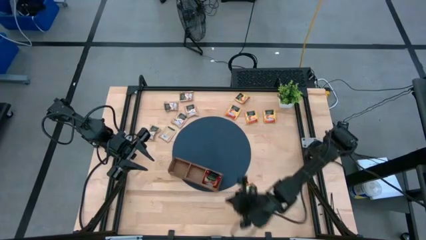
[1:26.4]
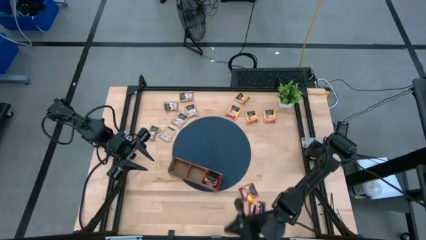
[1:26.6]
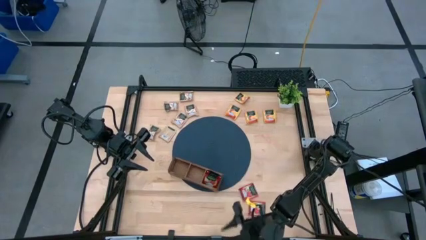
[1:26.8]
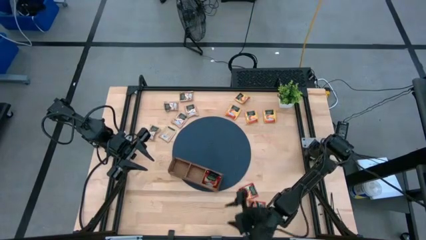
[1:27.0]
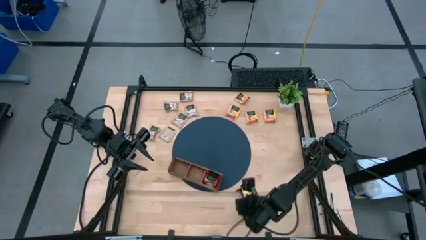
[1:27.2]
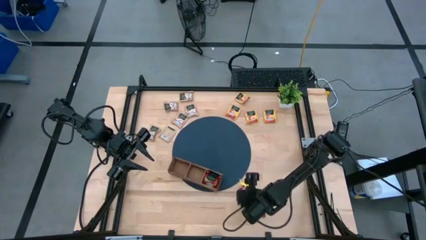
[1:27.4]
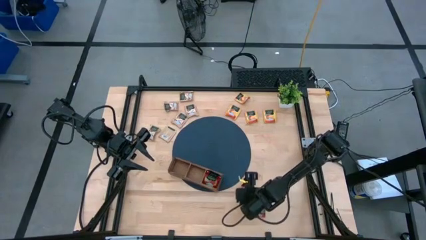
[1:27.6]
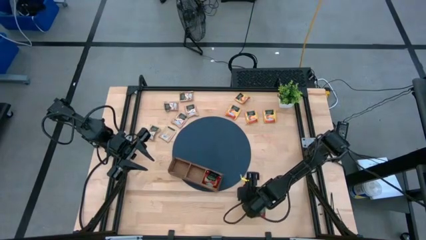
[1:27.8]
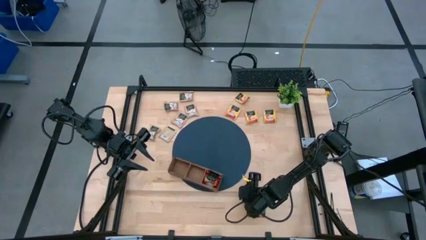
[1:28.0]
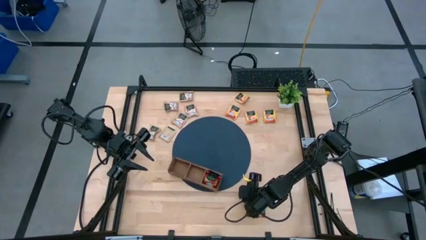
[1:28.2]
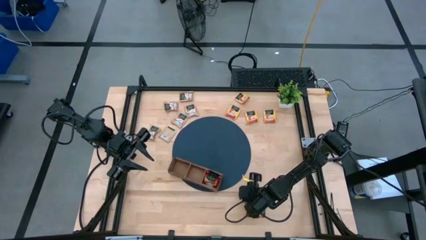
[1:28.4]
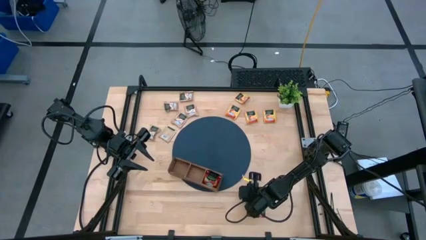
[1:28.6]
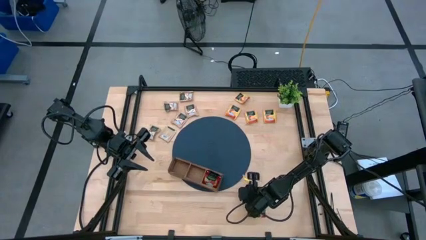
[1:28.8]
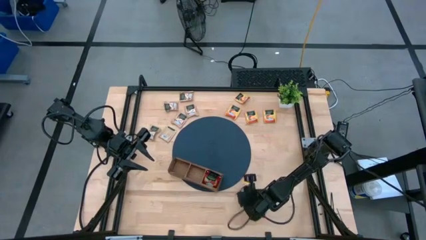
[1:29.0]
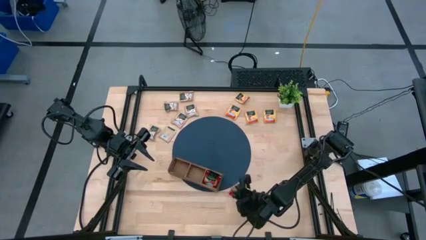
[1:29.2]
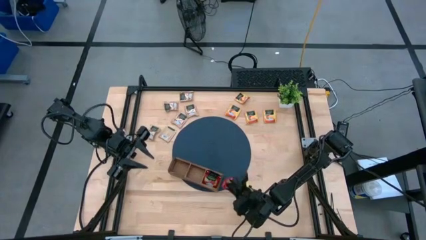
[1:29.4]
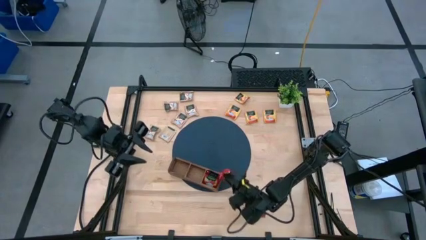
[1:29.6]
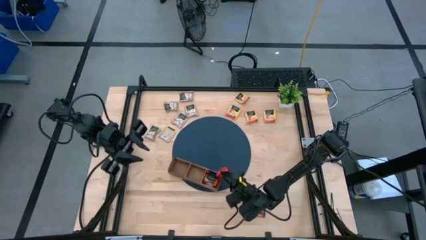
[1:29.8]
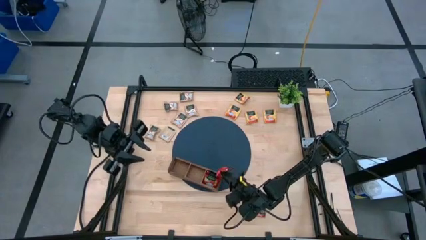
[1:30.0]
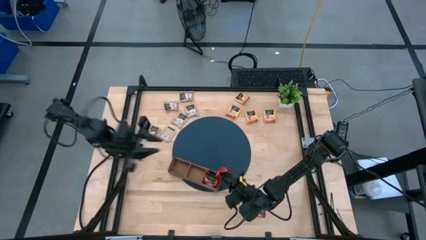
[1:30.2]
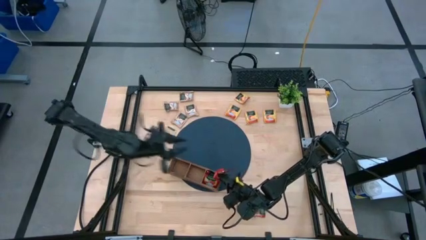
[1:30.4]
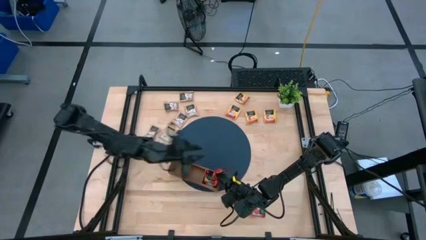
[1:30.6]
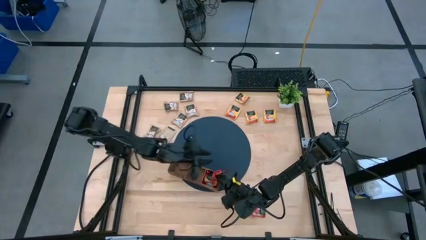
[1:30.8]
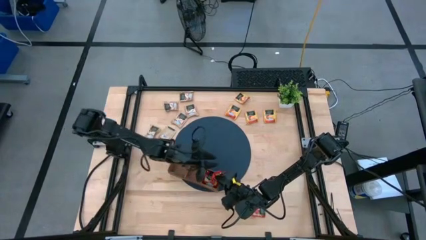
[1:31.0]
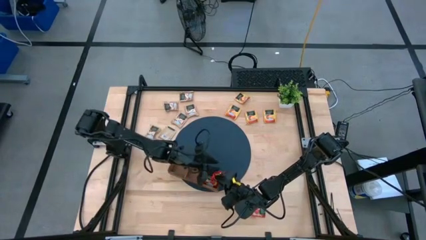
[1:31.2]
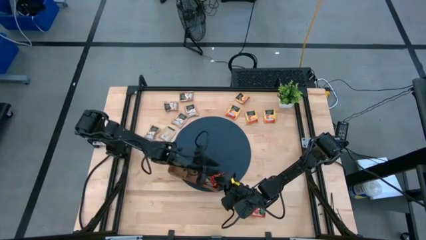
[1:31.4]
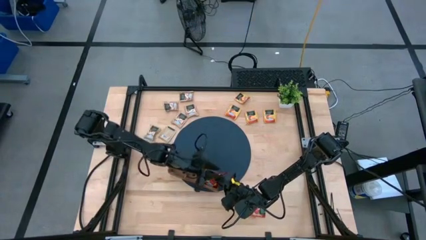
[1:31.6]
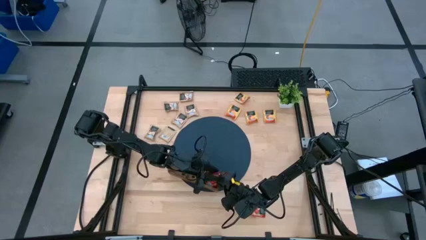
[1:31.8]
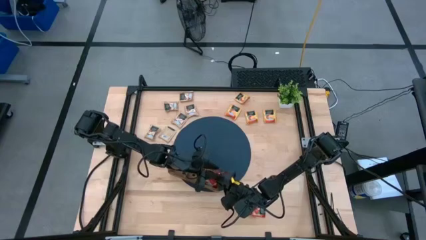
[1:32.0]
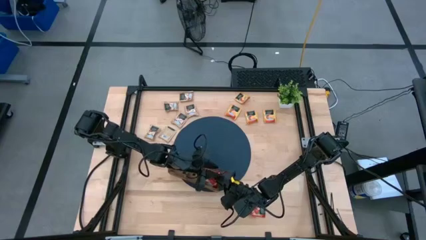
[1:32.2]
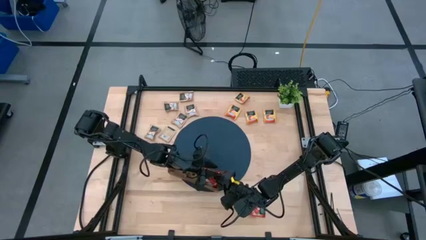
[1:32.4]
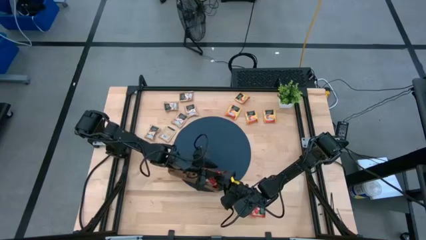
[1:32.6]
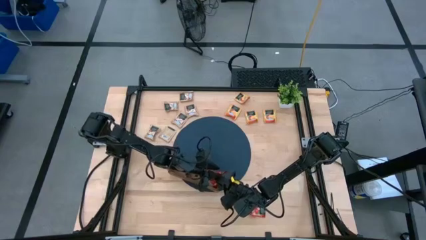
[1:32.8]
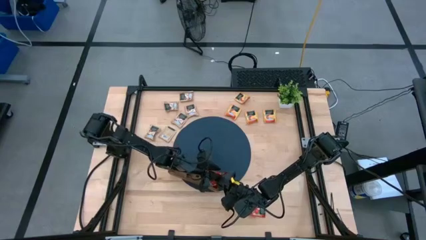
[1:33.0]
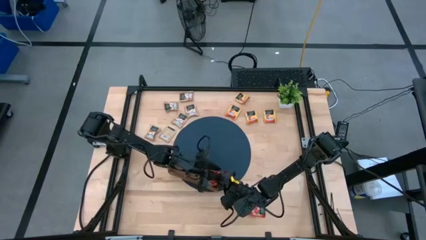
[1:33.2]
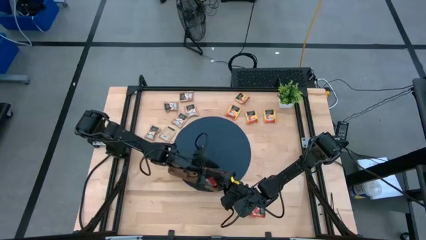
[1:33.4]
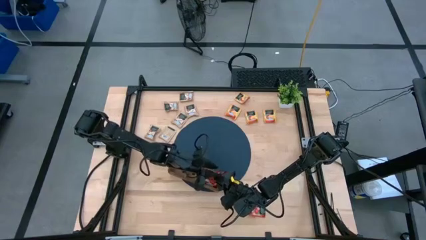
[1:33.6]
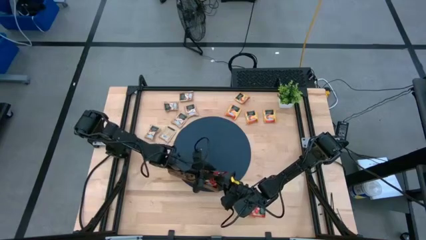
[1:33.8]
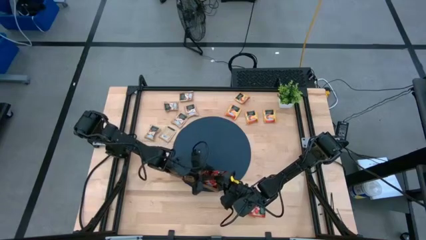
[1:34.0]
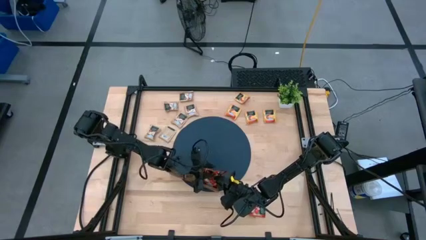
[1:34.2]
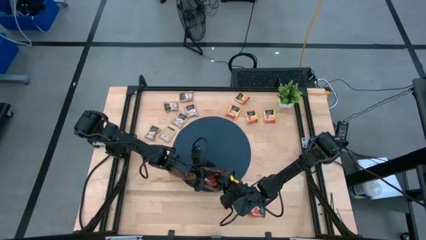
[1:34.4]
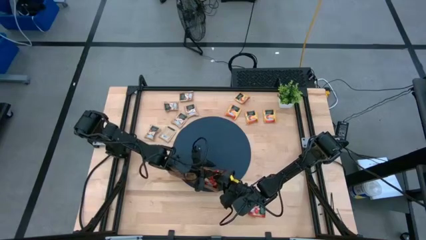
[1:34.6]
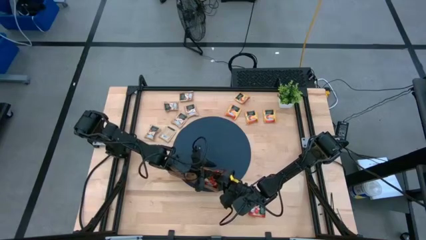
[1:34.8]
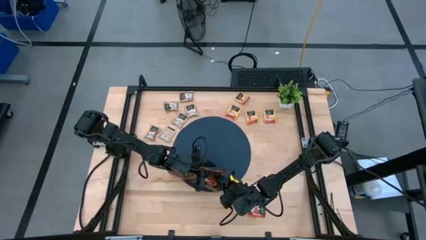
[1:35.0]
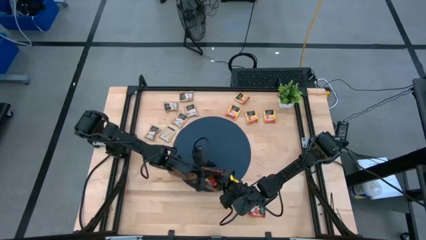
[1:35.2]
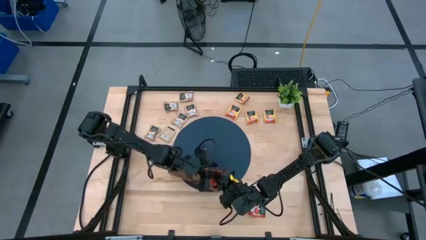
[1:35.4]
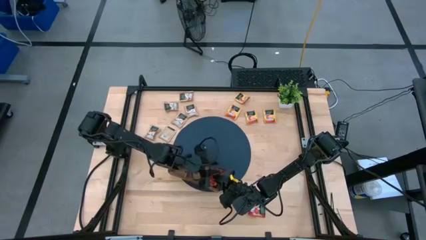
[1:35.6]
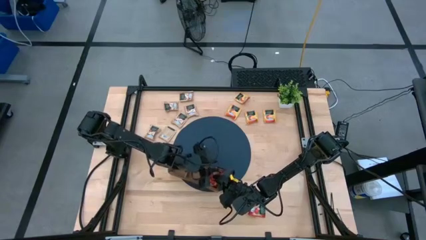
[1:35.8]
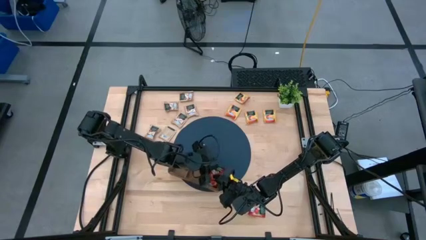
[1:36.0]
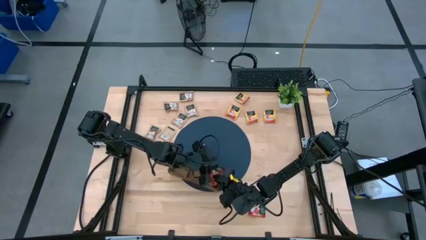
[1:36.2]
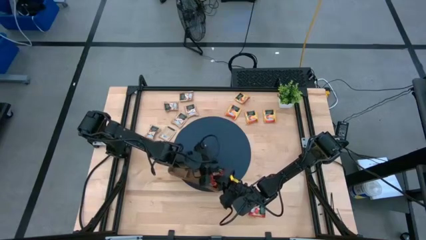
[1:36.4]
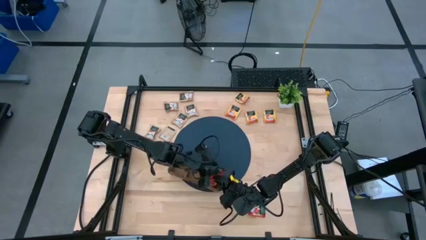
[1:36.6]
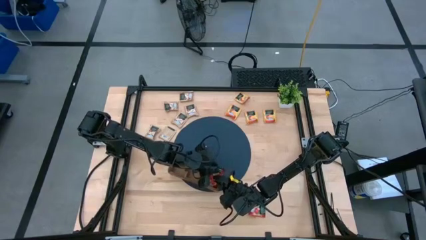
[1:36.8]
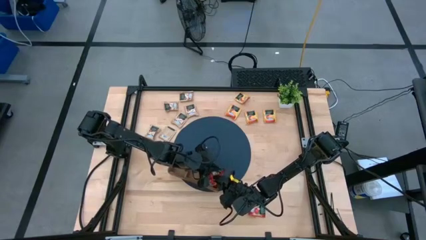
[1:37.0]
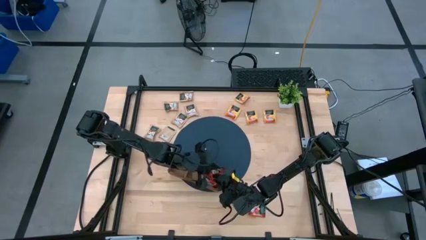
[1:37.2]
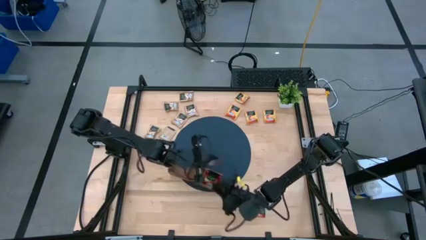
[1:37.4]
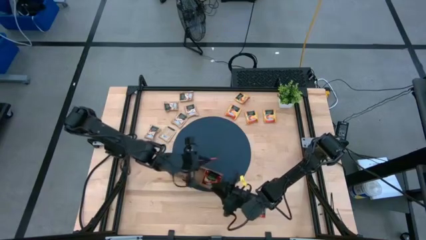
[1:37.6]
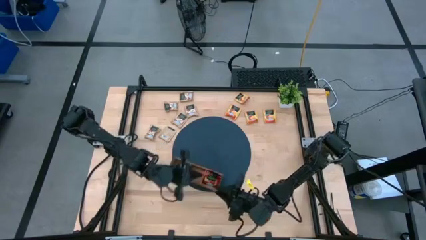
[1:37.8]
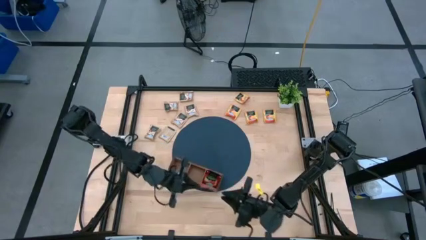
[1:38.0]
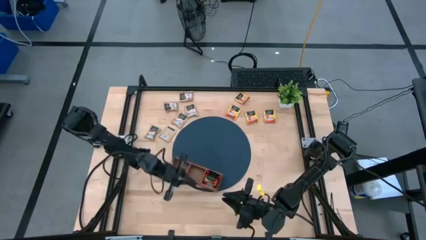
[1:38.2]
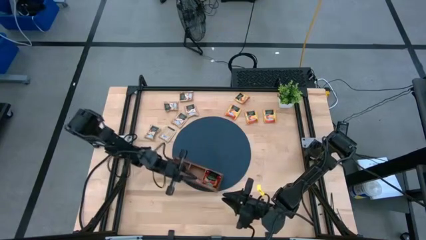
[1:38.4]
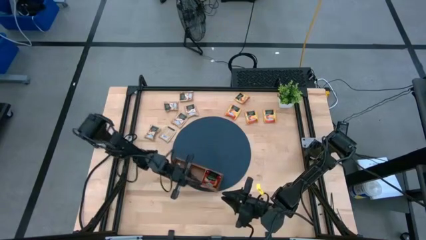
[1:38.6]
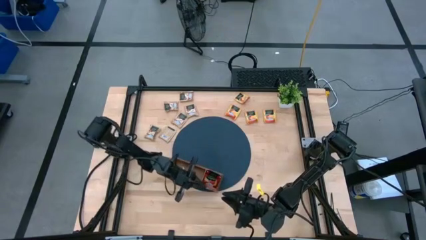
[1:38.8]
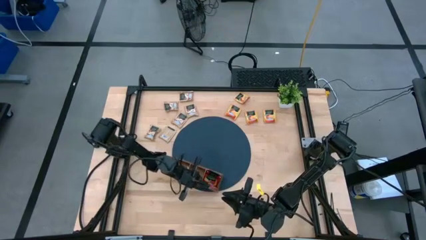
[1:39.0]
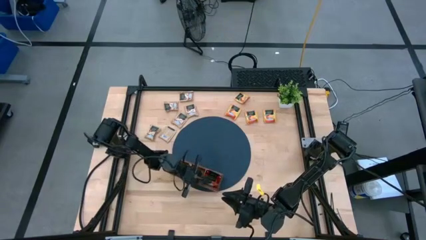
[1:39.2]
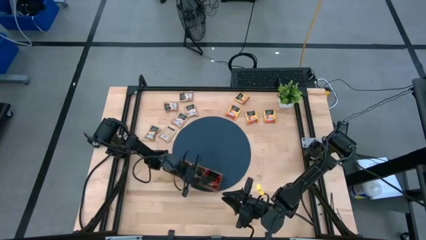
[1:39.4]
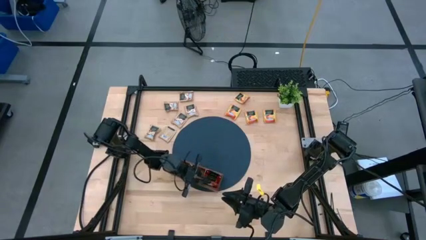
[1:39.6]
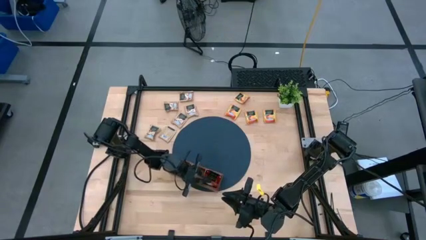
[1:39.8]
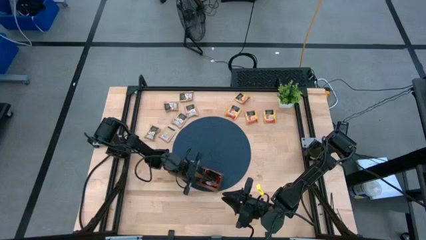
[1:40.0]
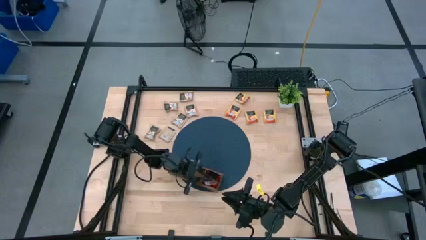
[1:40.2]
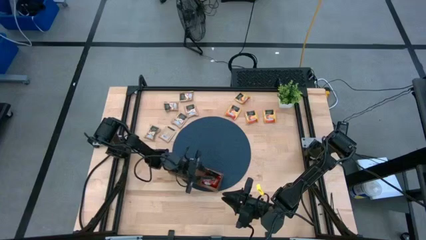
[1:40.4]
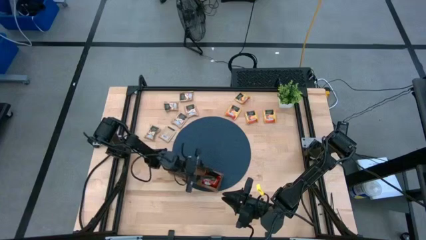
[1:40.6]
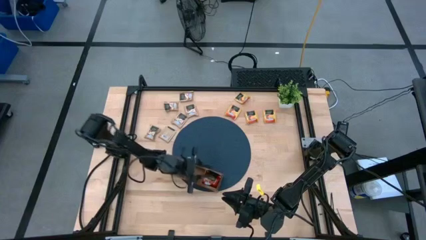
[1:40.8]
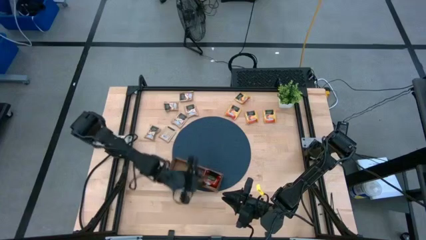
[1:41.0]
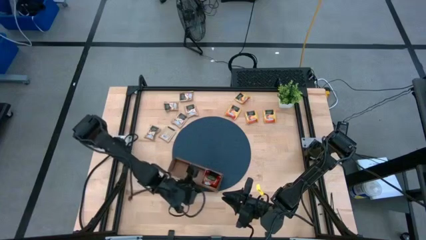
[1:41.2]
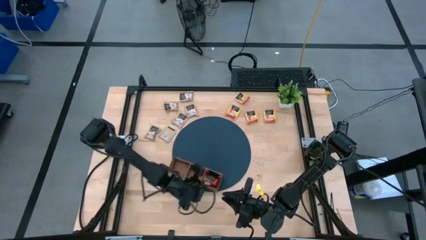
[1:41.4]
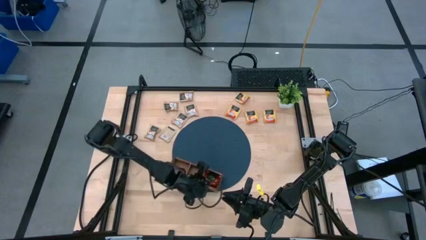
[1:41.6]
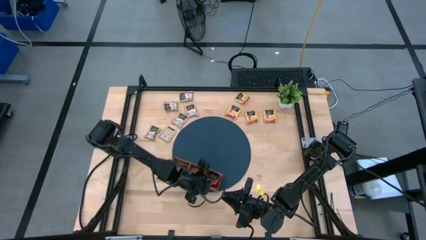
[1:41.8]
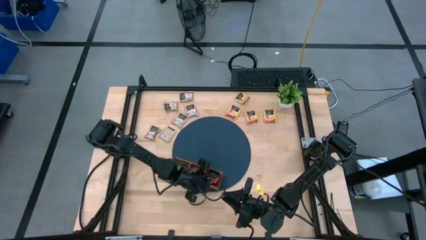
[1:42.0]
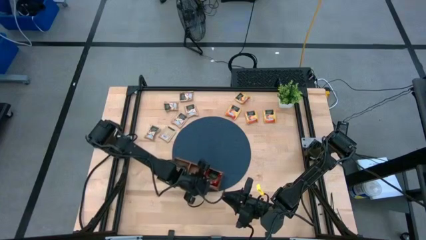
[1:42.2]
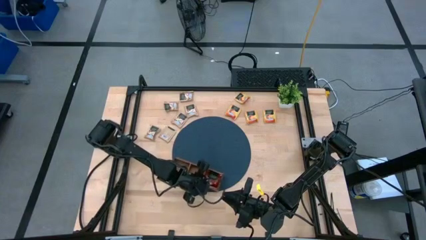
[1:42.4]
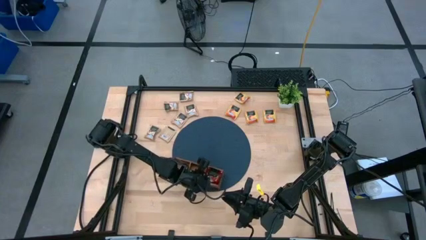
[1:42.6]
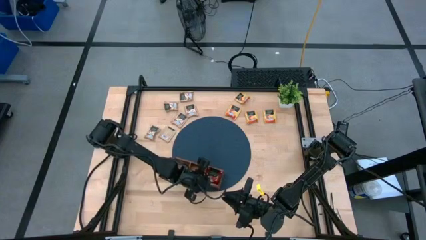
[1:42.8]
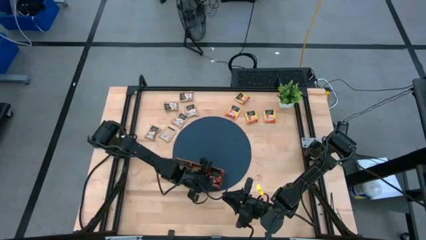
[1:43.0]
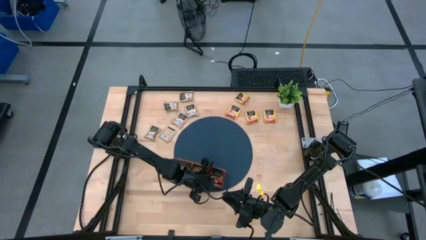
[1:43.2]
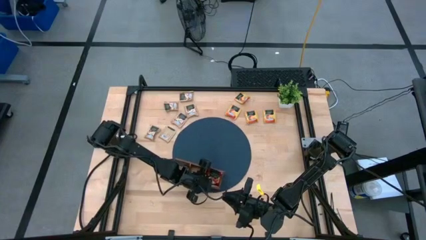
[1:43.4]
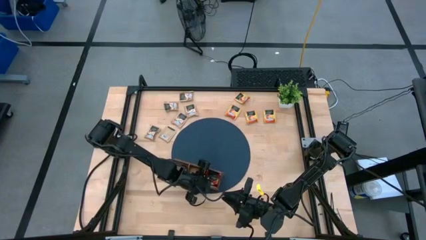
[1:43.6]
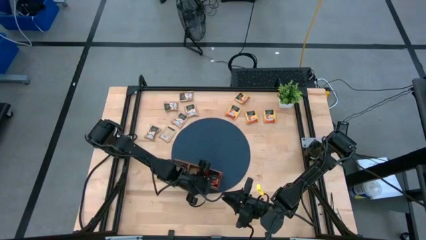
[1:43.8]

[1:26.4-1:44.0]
Task: Pick & Place Tea
Put the red tea bag into the right section of the wooden organizer
